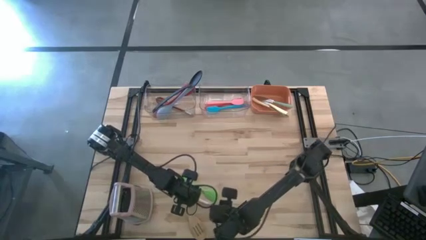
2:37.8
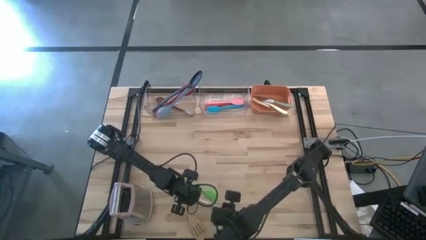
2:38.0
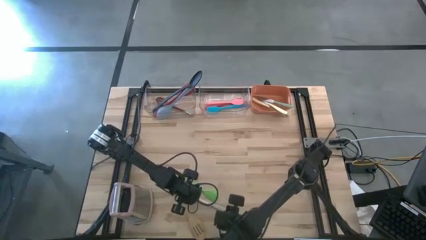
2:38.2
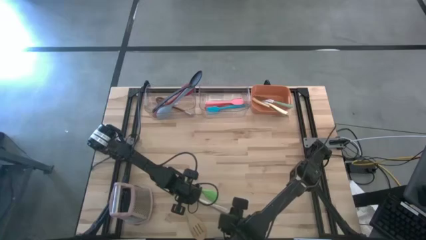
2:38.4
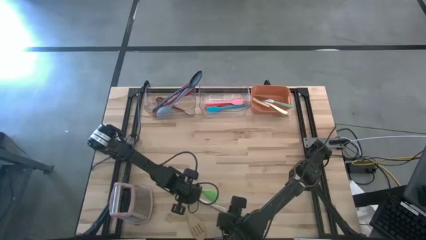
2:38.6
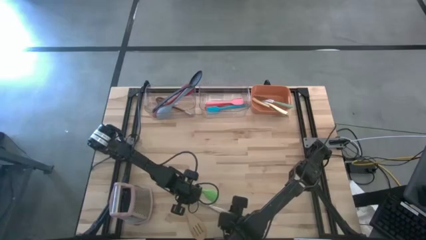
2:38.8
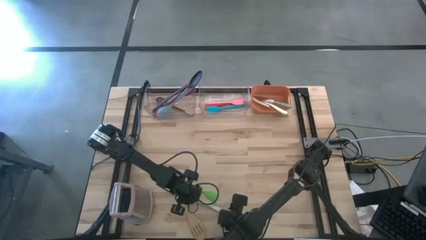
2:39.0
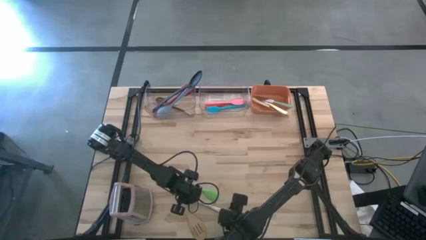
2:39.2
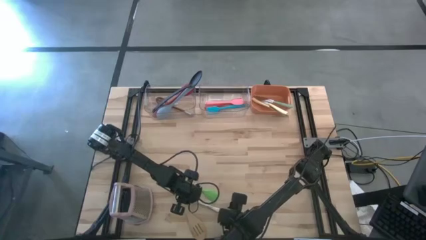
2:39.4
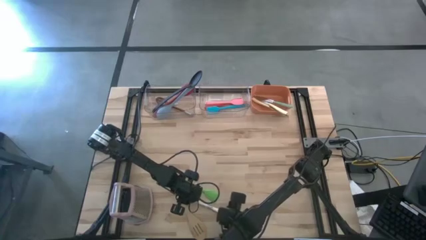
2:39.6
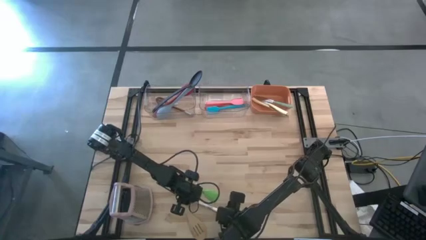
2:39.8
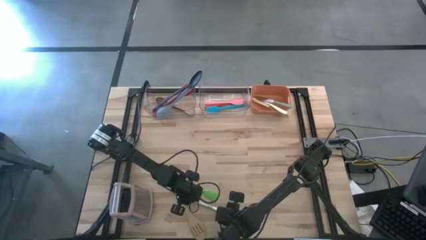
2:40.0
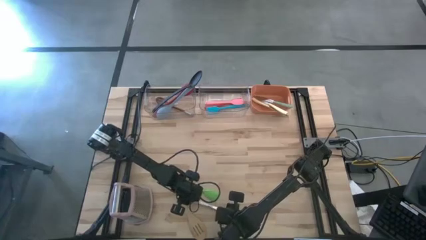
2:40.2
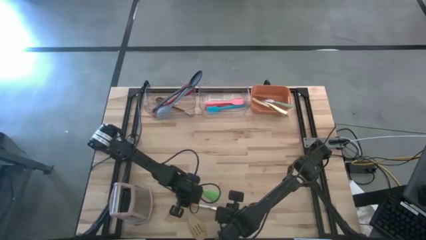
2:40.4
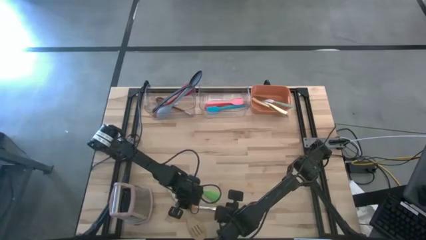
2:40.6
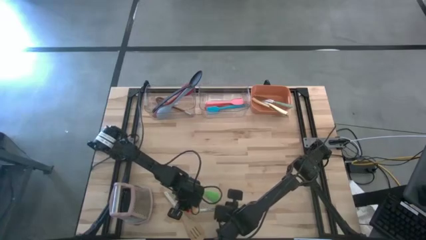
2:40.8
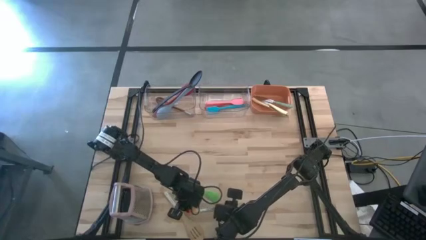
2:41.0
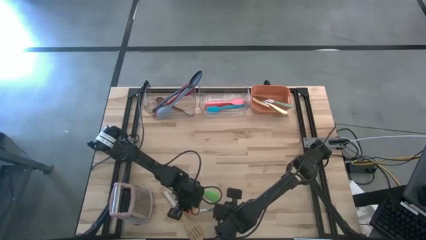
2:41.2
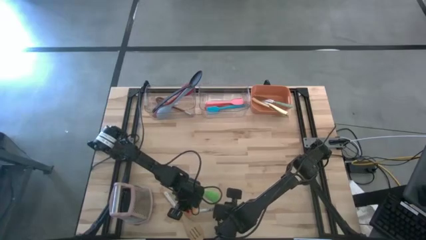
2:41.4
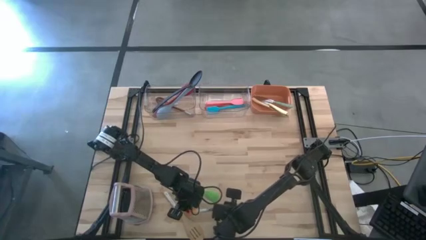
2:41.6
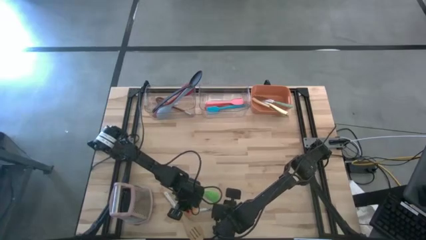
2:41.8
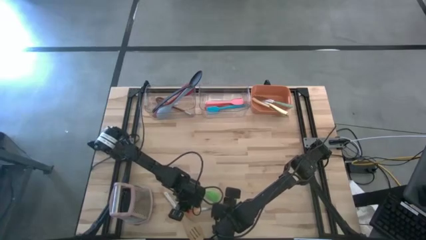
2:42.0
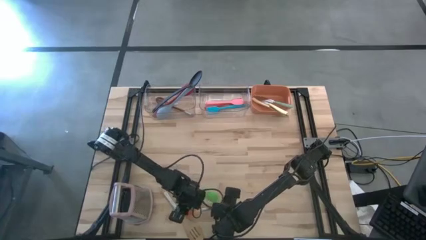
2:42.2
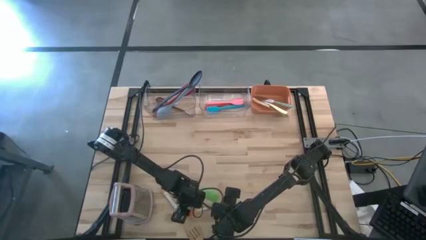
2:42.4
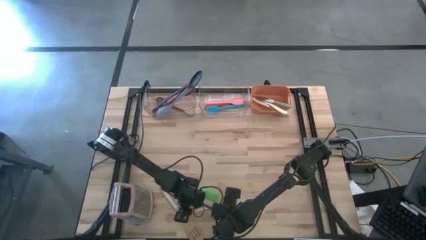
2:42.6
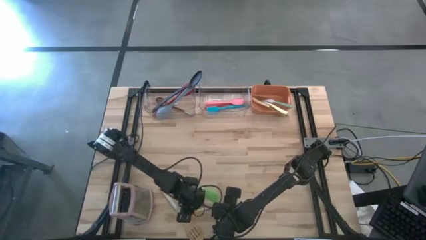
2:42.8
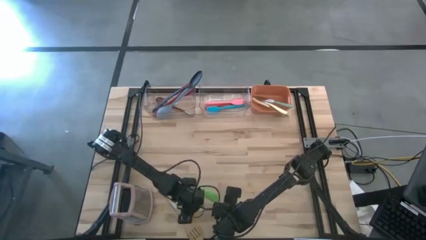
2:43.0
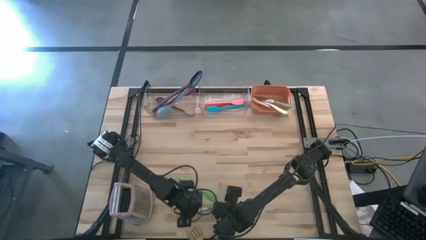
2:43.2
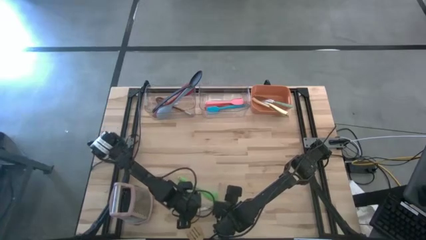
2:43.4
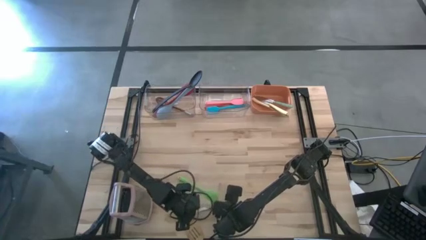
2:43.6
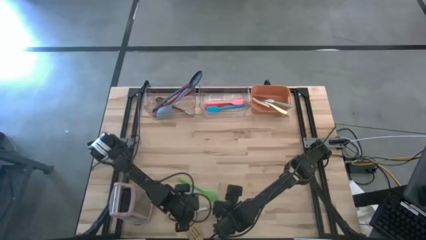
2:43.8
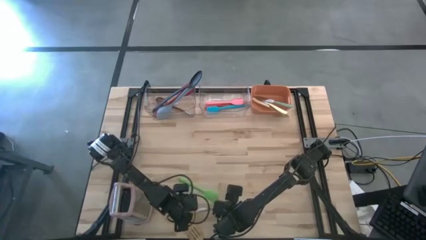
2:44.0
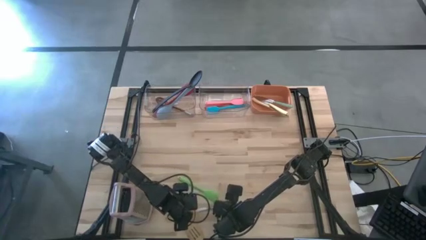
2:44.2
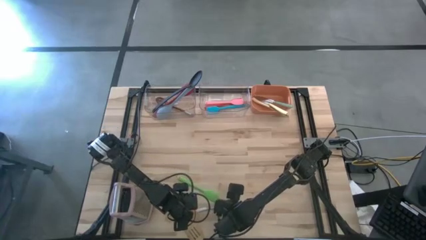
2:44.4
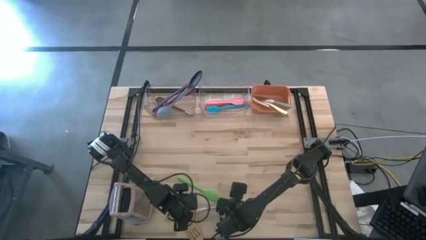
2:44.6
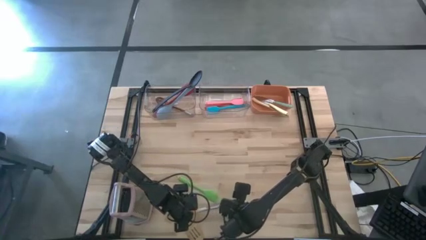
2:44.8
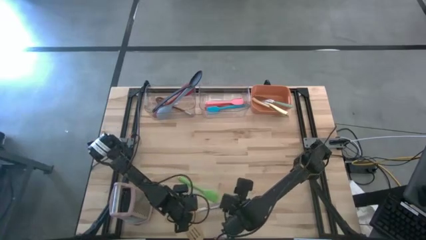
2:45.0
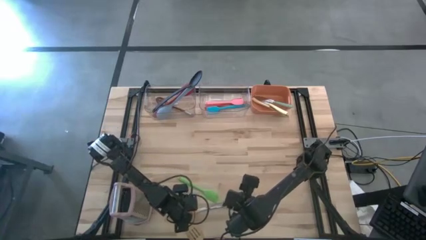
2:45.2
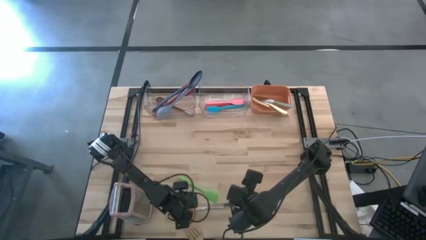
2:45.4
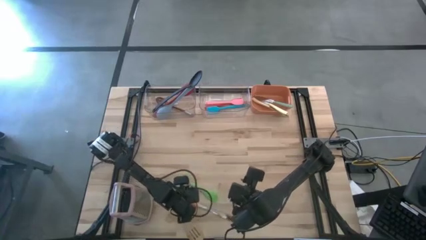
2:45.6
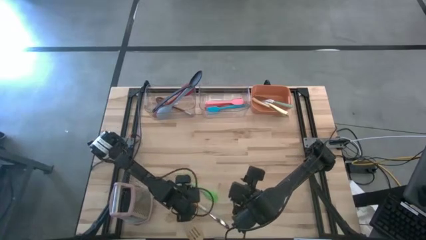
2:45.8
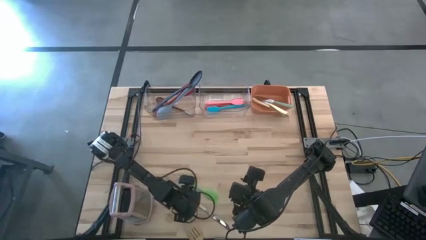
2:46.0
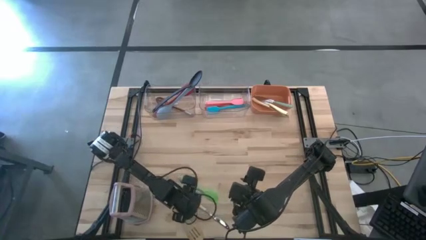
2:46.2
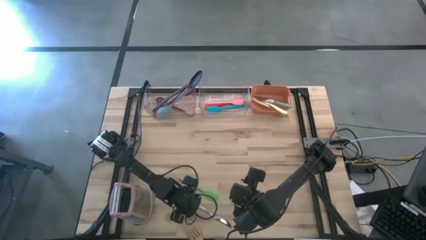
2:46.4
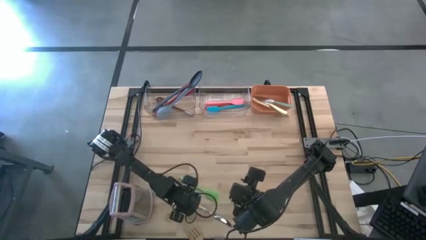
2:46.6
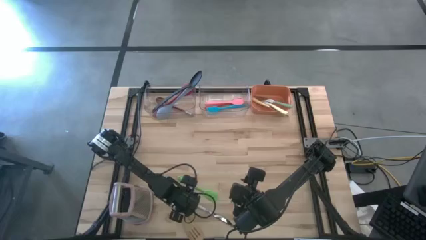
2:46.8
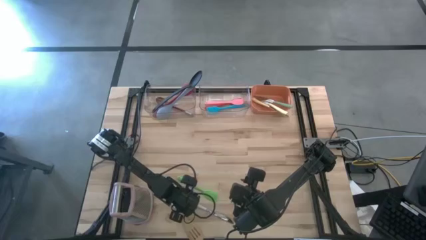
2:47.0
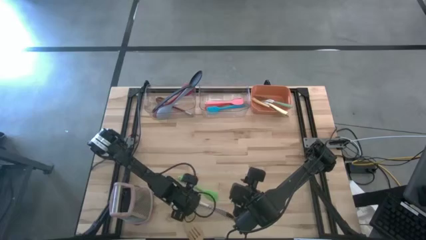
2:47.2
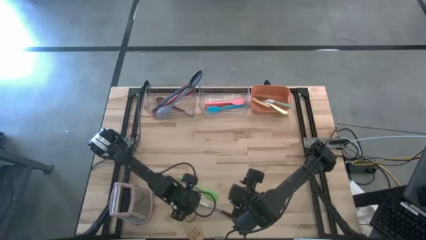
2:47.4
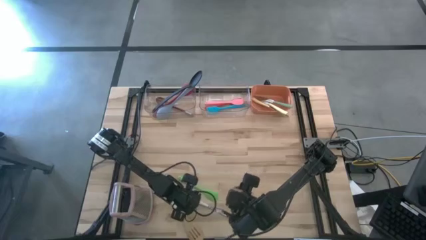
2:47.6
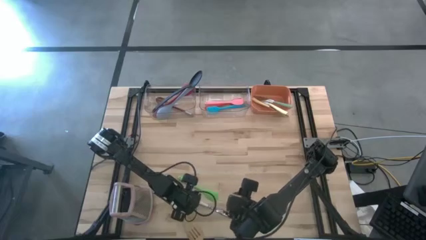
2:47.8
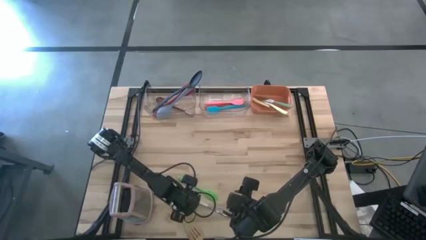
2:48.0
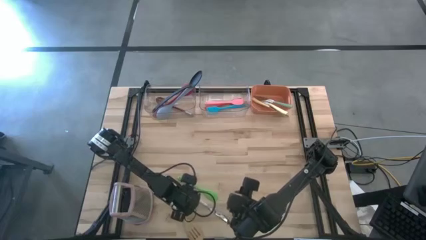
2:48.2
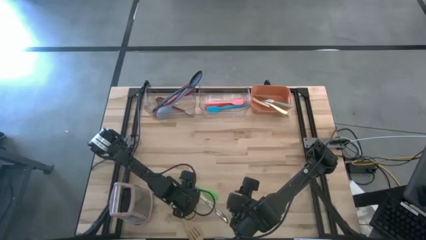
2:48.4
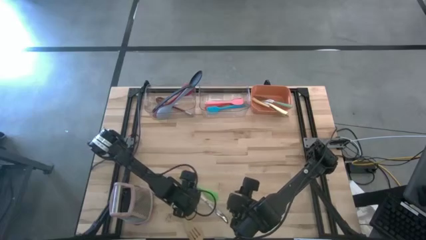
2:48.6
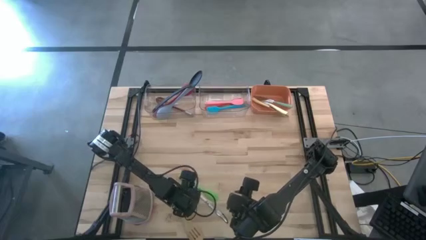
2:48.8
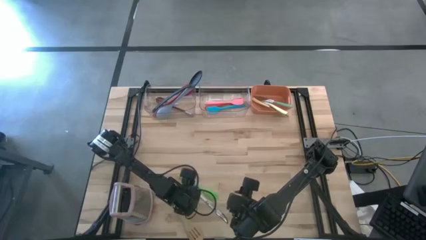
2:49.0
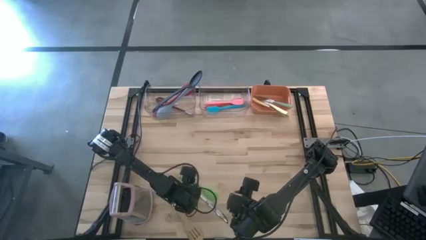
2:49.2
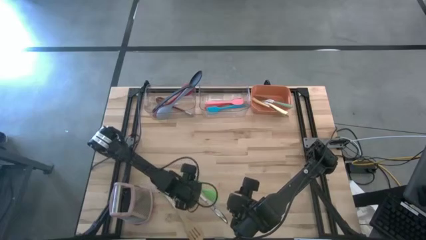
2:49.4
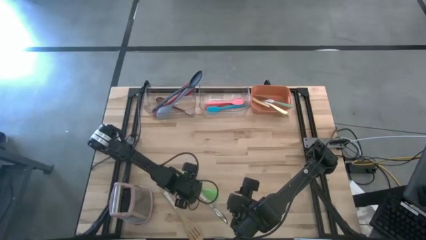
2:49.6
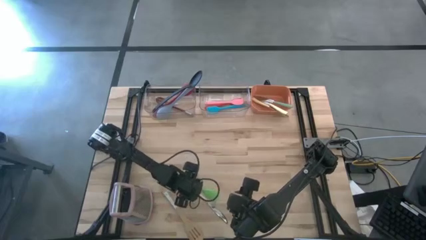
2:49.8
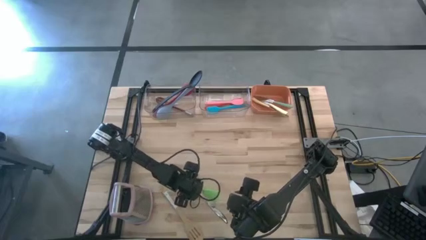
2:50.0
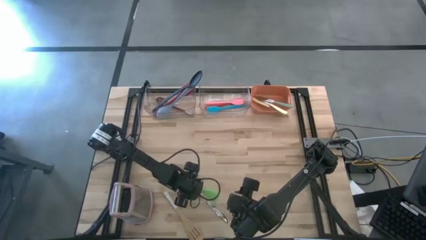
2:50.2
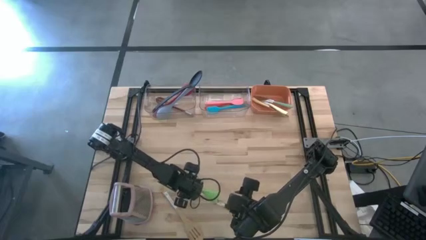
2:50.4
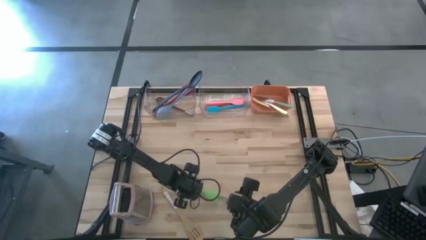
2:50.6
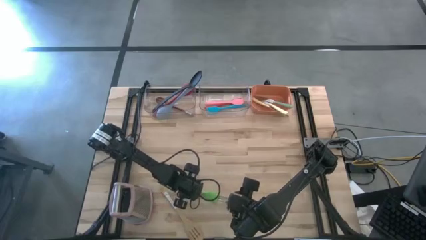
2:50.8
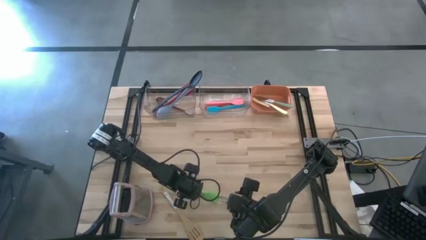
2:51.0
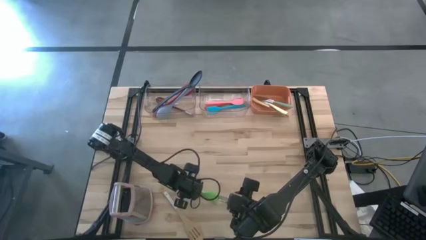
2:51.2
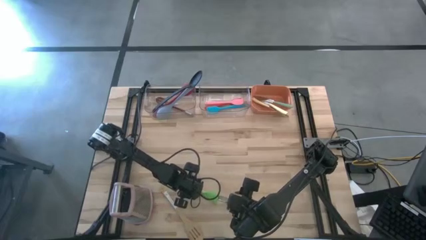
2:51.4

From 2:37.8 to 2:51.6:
Task: Pick & Place Kitchen Items
Put the orange knife into the orange bin

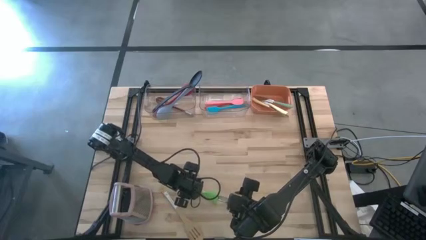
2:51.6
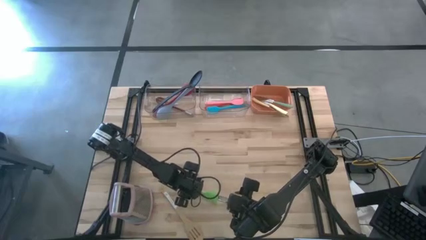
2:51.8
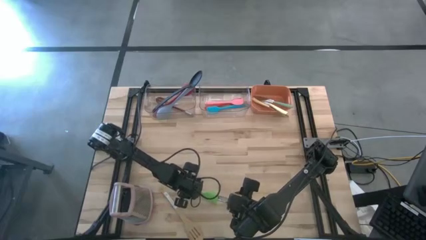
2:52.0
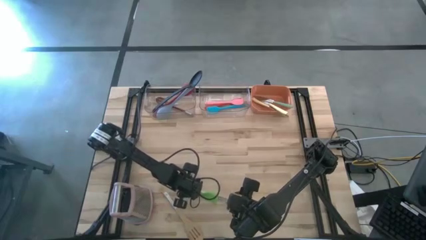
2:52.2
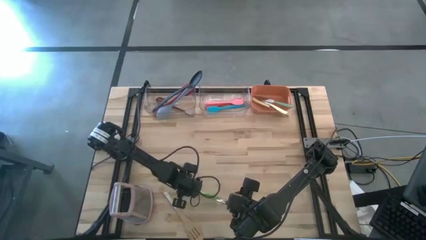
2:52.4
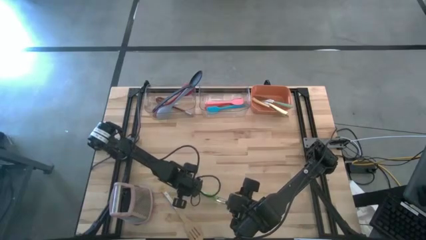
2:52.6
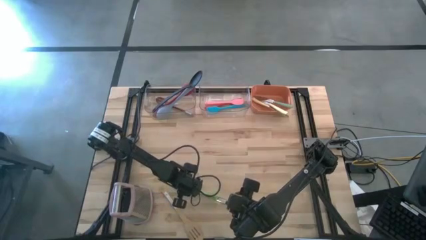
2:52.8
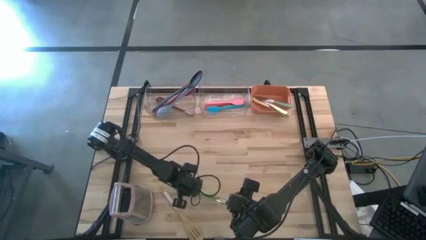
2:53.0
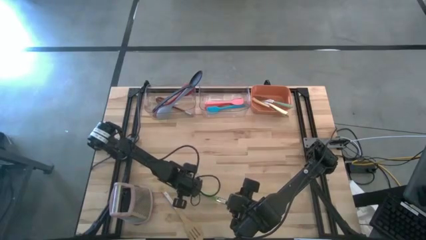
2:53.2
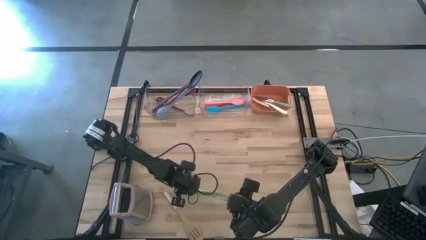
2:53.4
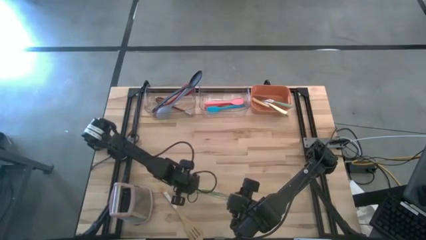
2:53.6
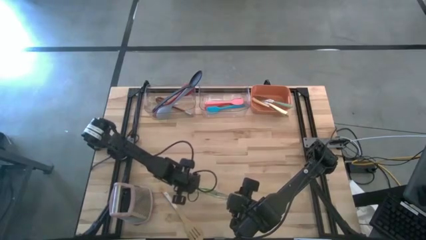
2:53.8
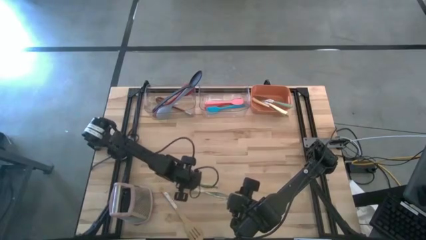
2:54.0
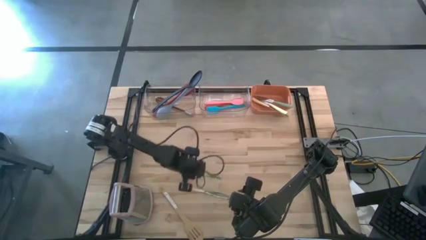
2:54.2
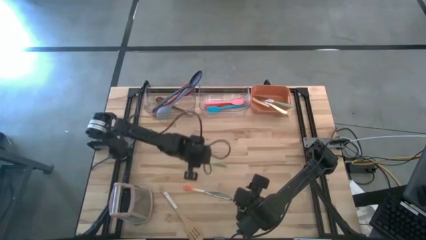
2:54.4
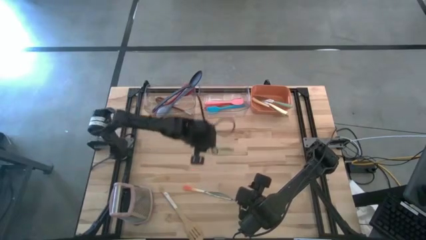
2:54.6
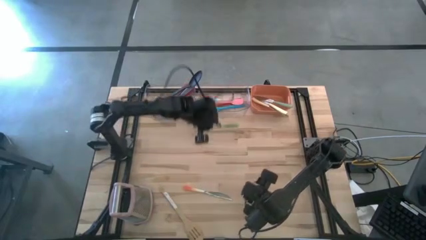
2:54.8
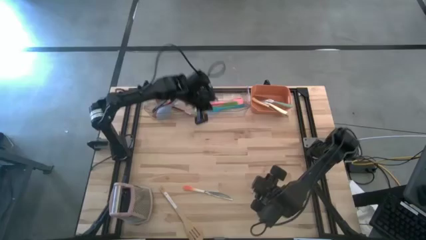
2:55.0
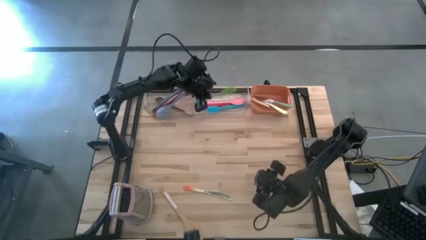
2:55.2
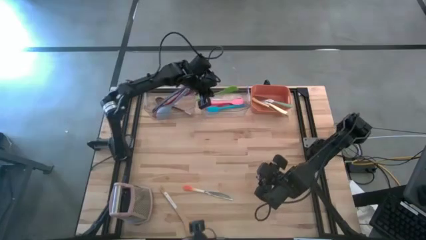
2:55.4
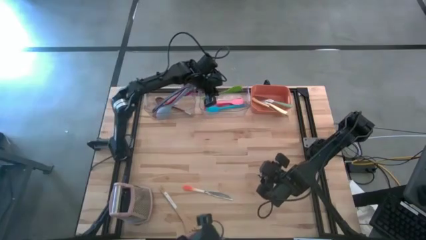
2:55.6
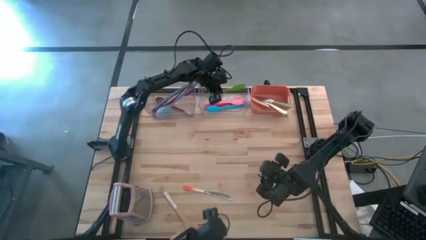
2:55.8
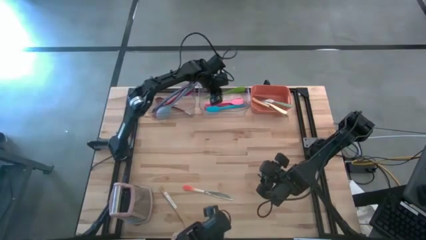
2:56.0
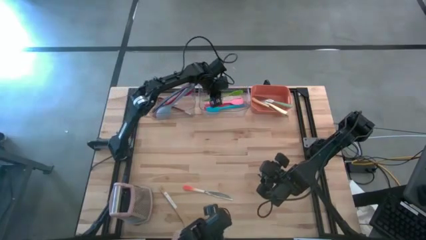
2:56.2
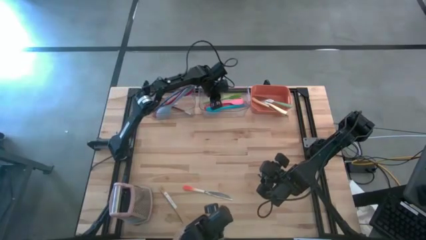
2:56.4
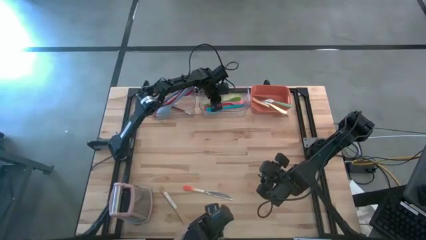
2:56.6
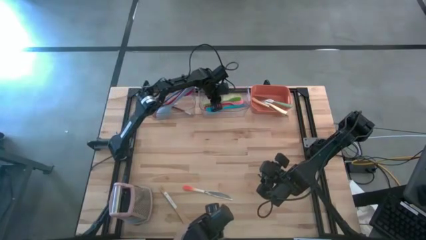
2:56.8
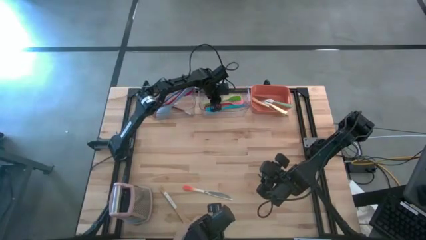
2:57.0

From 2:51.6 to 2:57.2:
Put the green spatula into the right transparent bin
